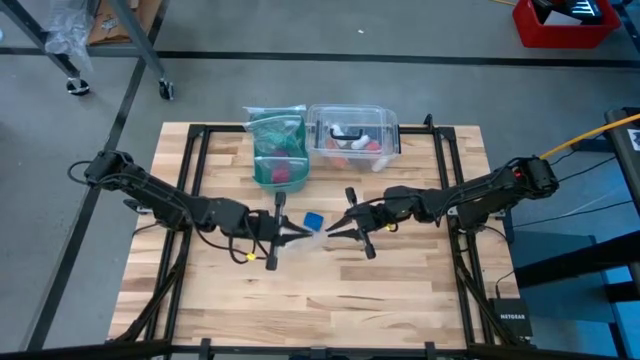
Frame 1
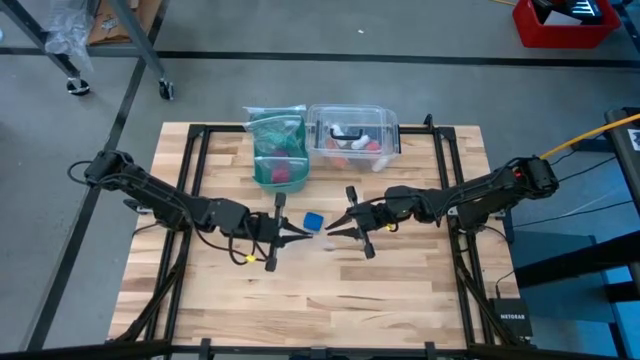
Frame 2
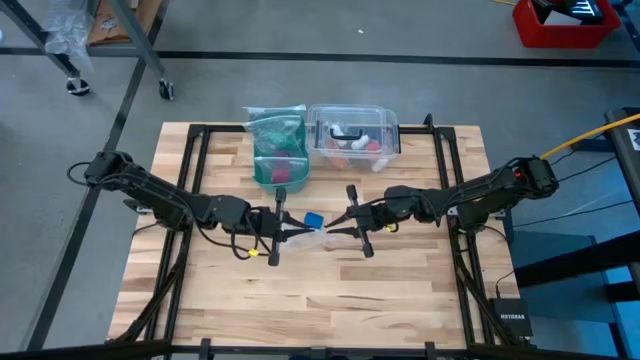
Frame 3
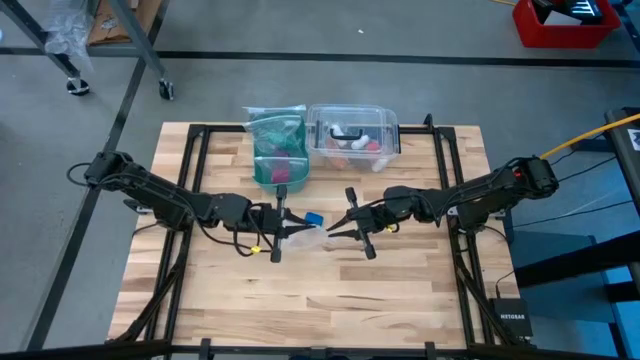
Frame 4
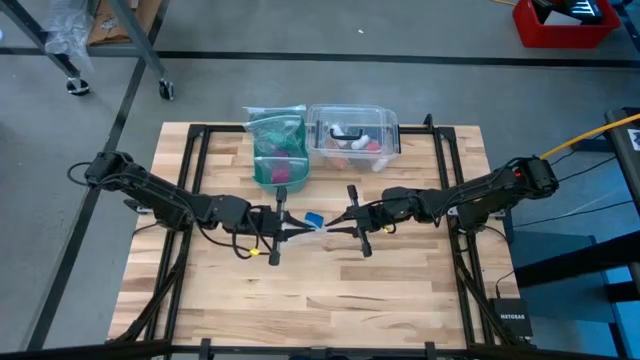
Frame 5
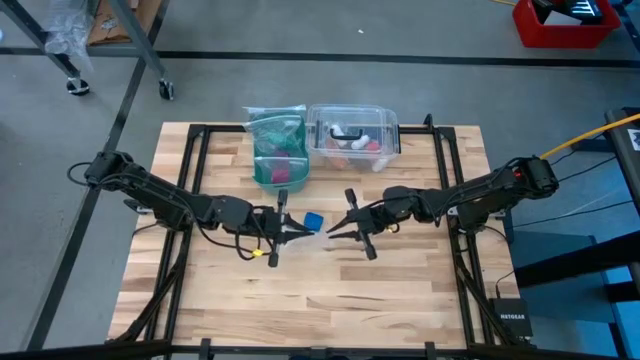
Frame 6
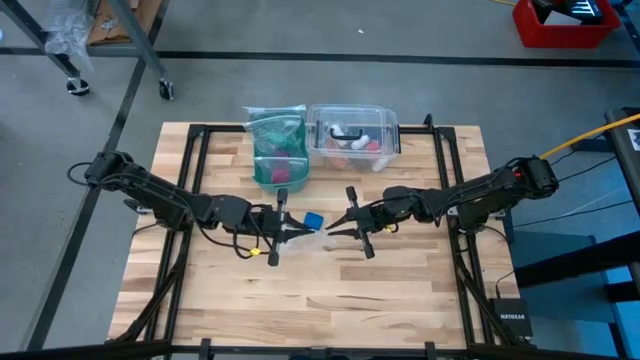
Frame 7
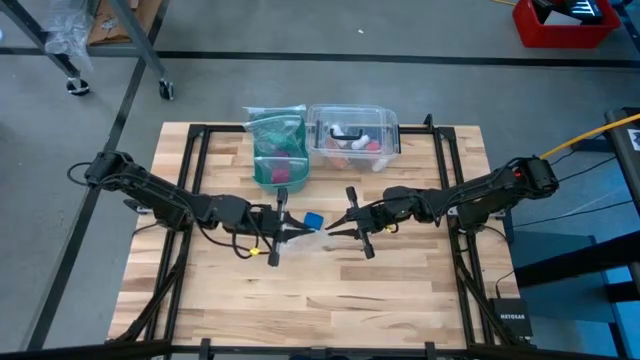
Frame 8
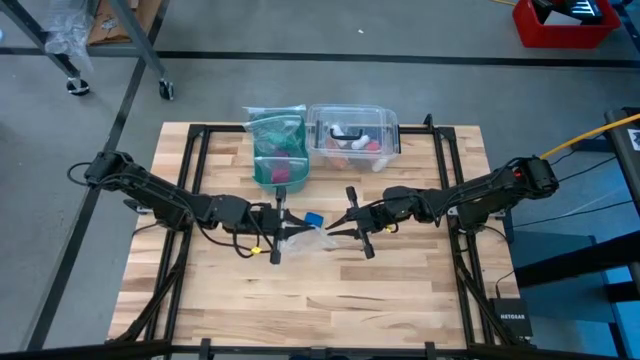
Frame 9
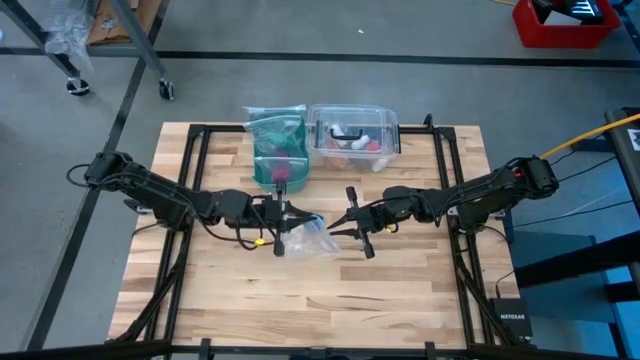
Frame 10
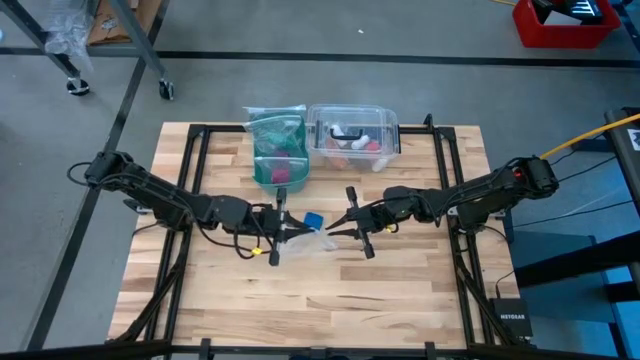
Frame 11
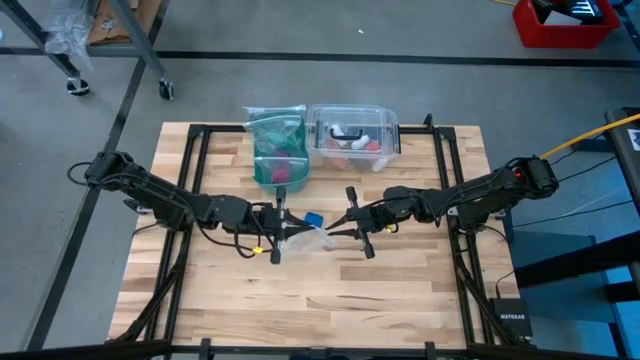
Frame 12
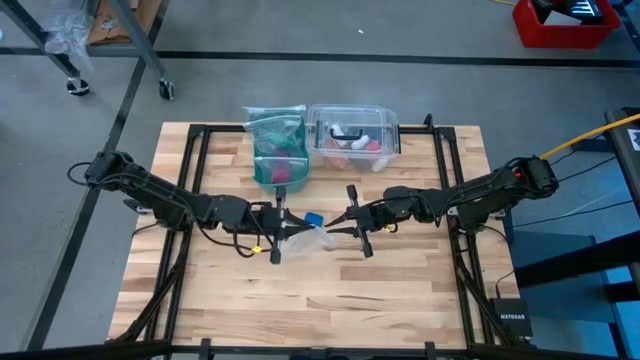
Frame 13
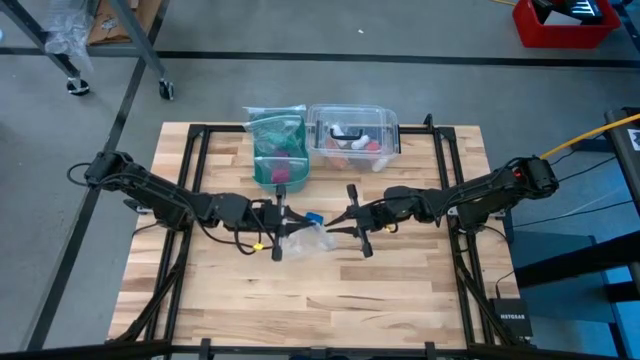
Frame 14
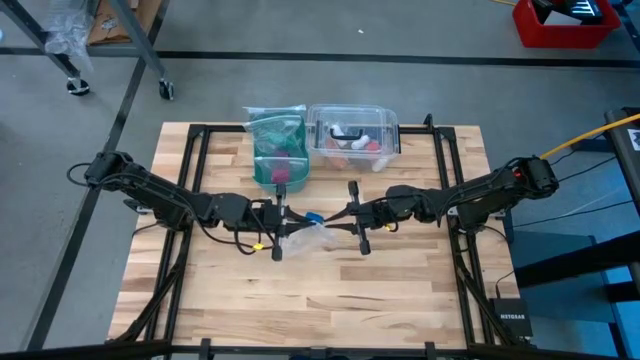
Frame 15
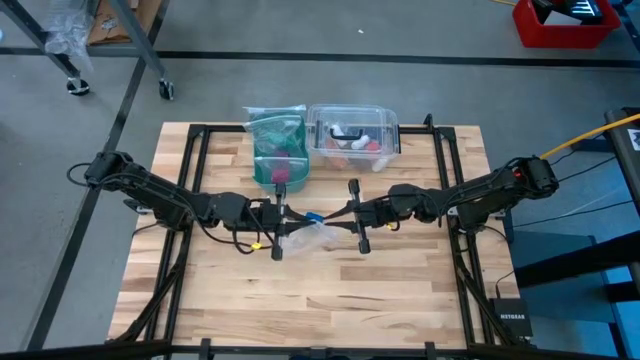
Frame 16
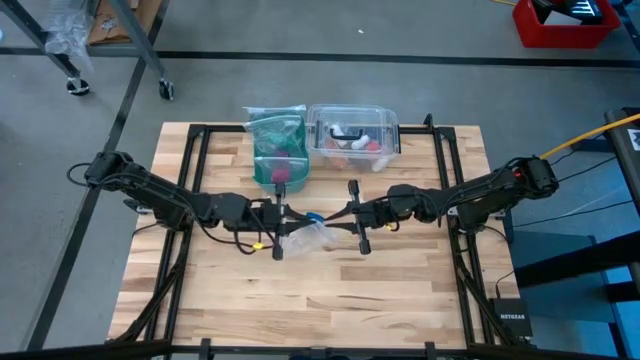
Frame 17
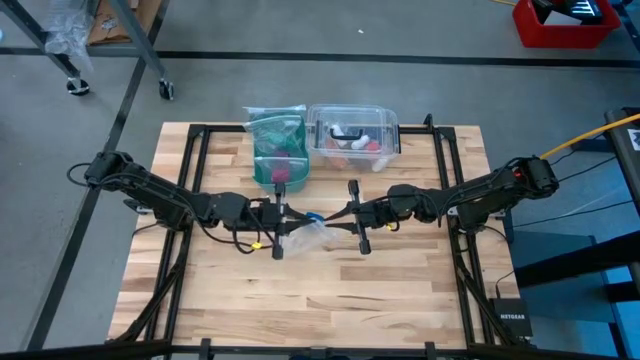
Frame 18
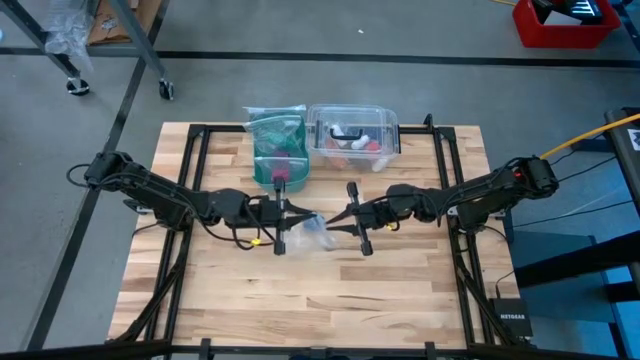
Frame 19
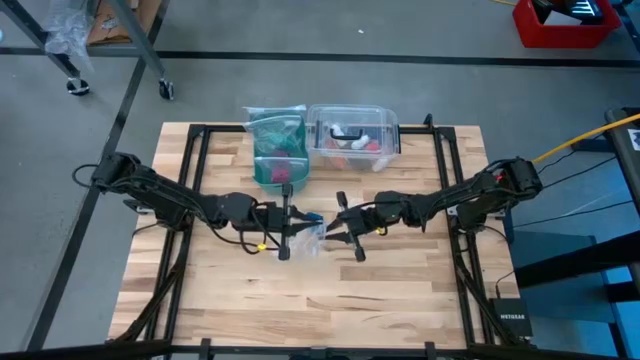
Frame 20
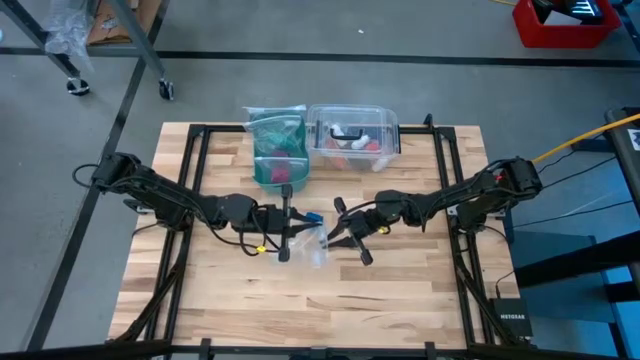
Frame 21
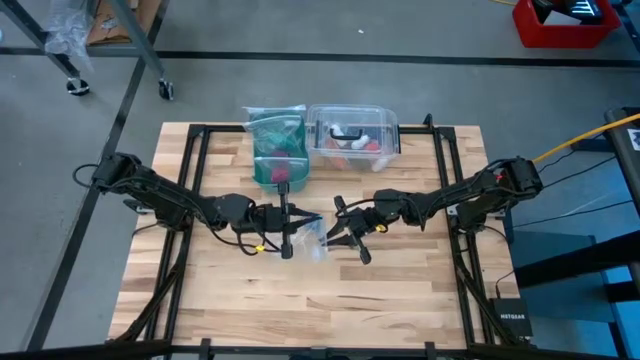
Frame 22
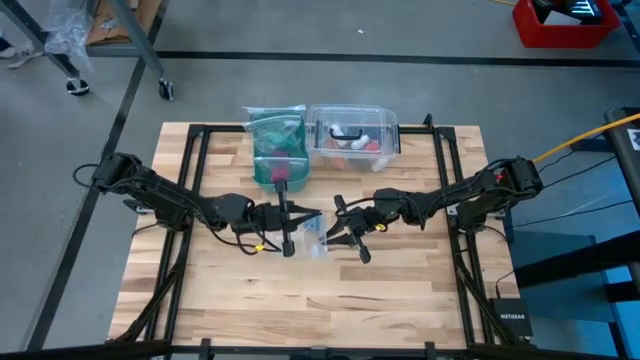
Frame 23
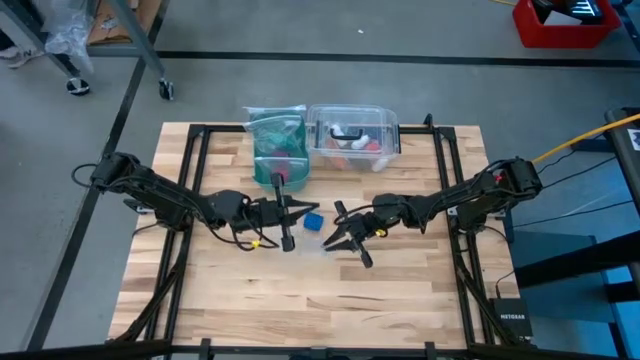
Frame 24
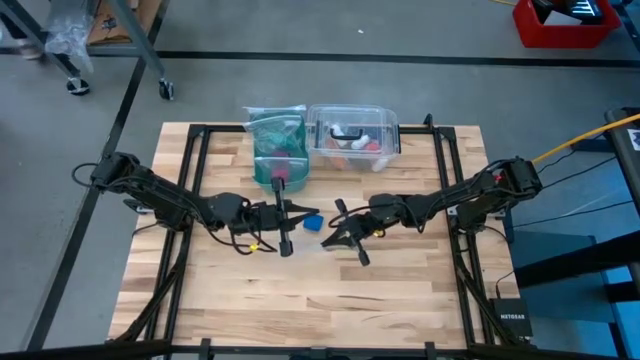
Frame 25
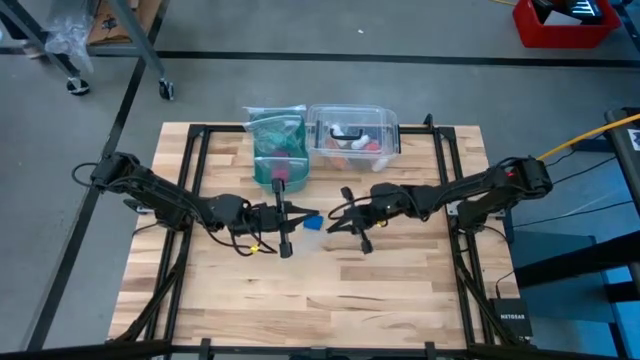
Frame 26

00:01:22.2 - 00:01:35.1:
Task: Roll bandage
Open the transparent zip bag

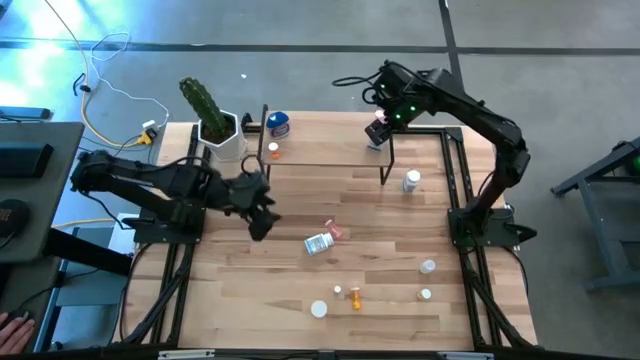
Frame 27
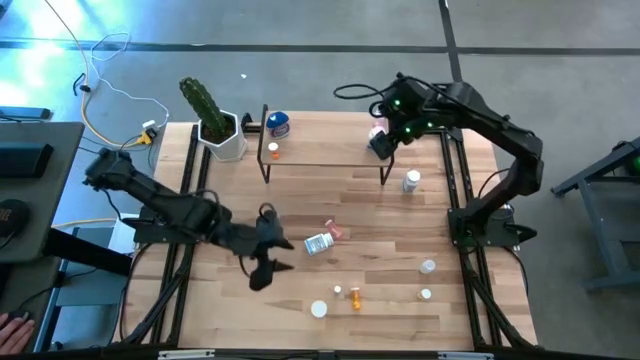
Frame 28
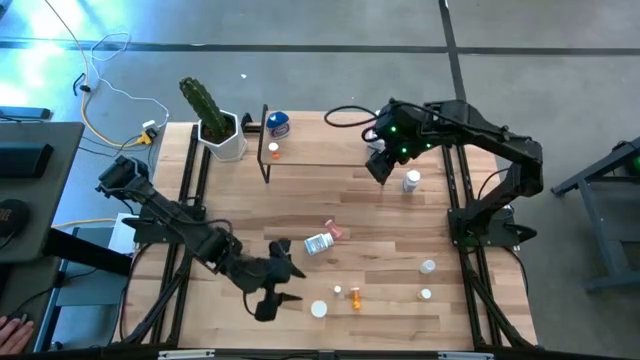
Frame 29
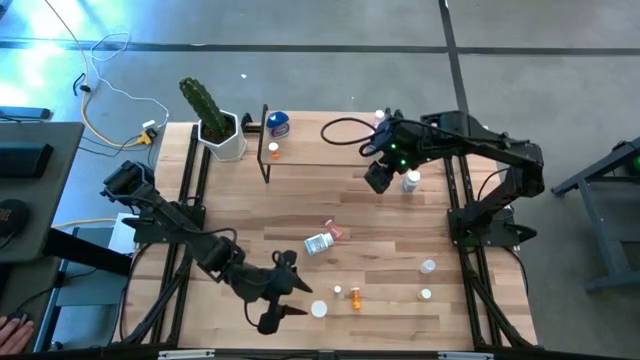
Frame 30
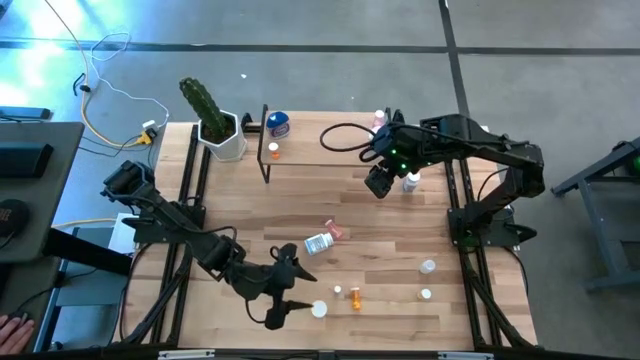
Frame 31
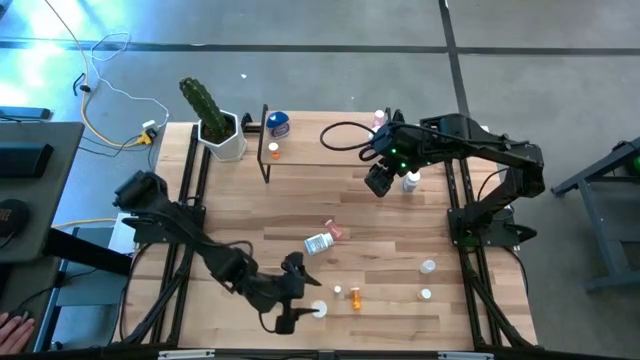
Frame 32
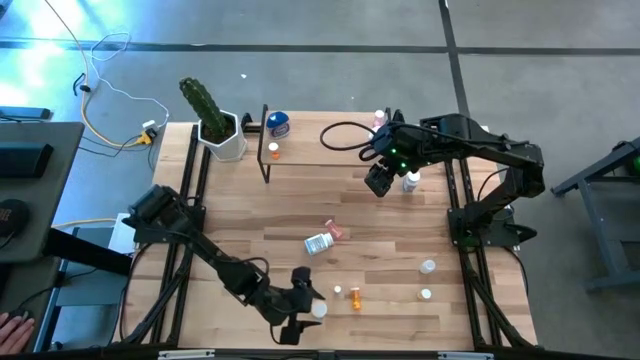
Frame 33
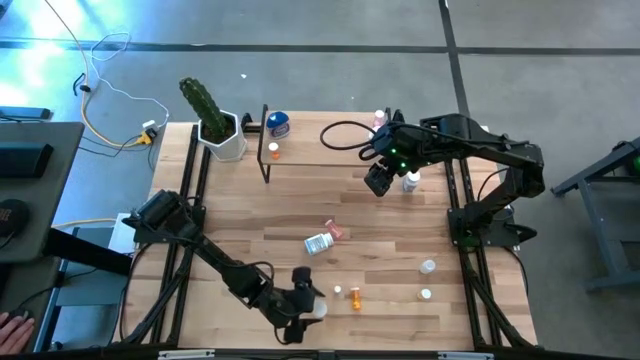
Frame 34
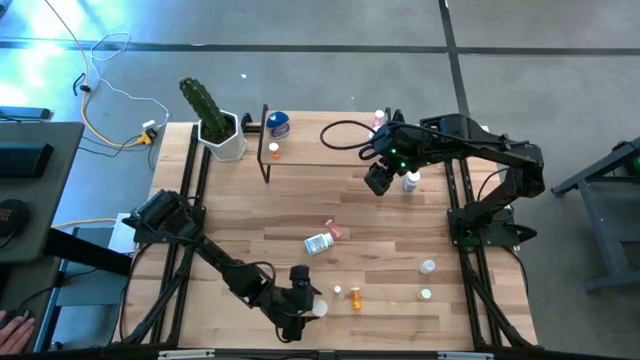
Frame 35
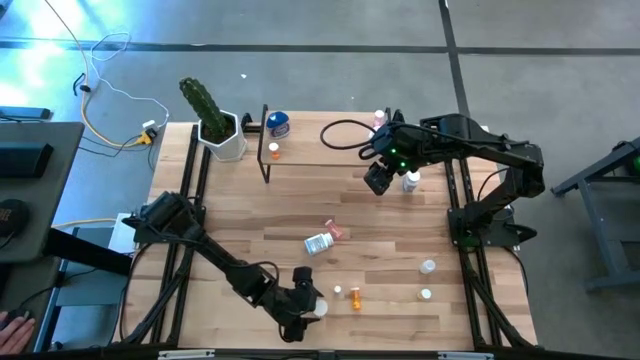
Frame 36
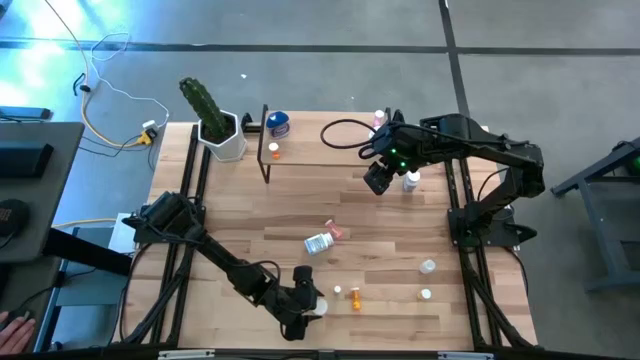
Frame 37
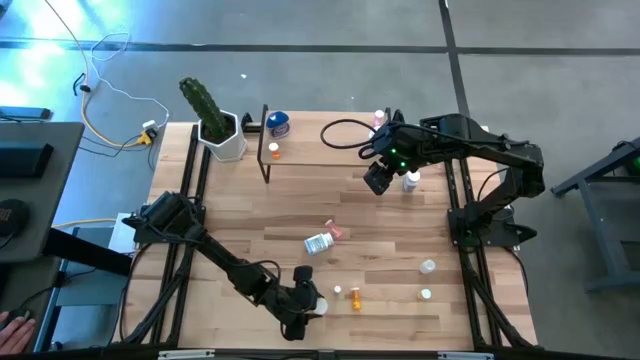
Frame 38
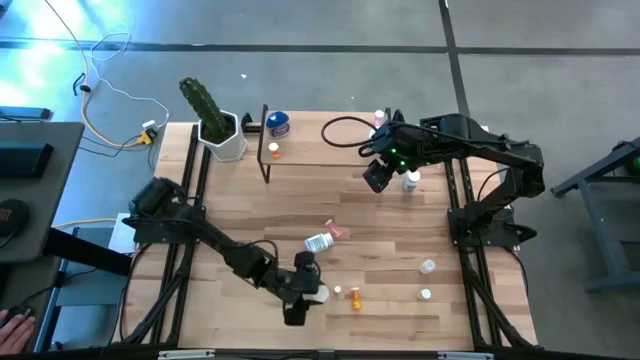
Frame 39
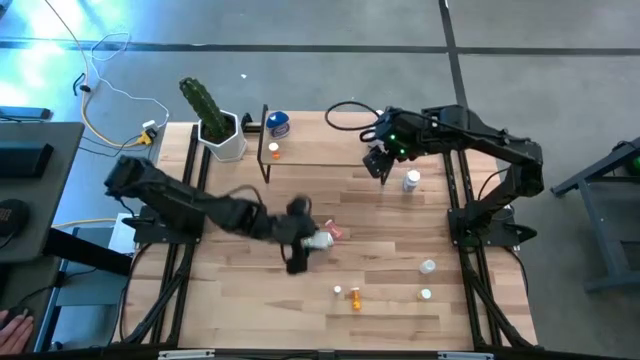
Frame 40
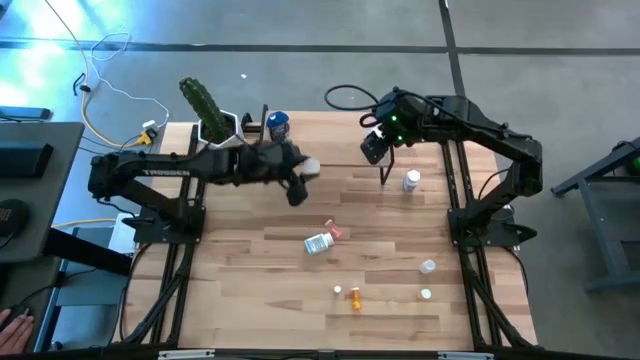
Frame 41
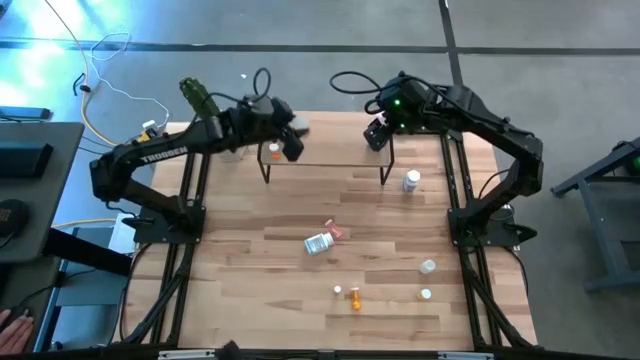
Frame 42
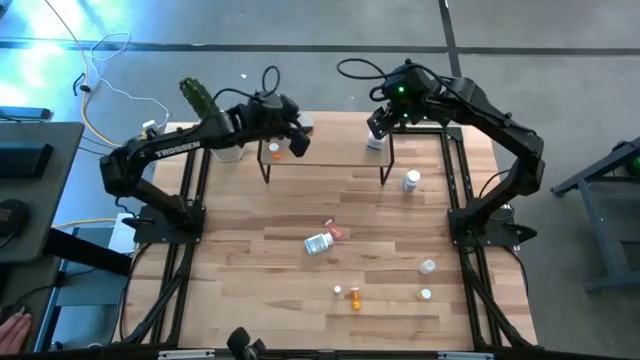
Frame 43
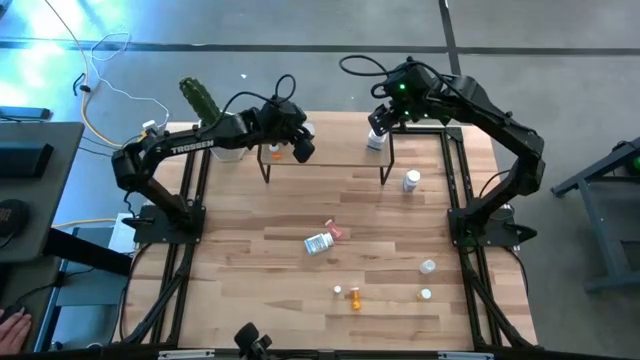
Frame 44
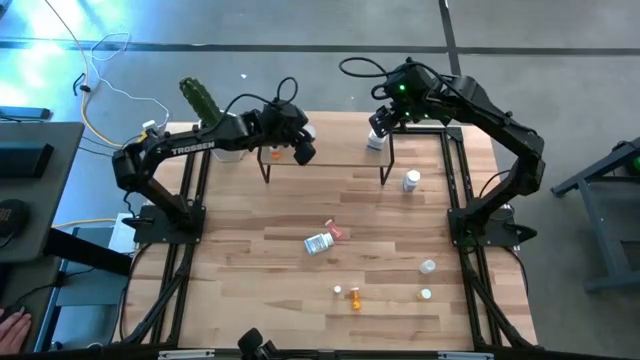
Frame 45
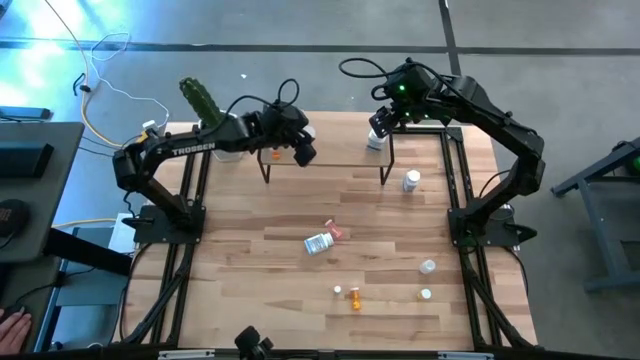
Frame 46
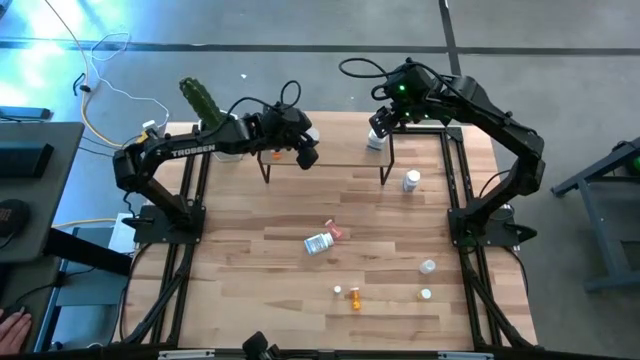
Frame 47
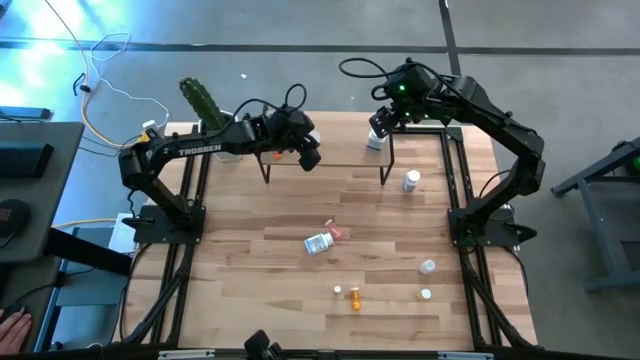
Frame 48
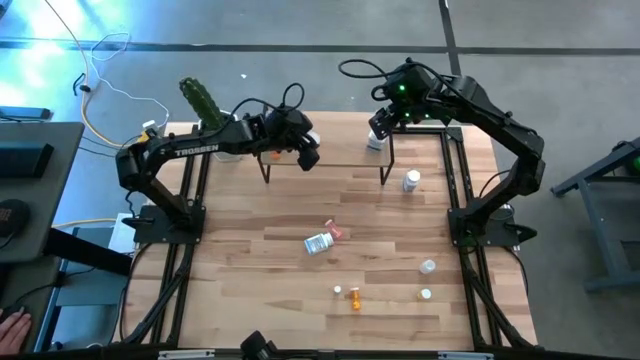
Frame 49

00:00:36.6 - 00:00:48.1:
Task: Pick and place medicine bottles onto shelf by color
Put the big orange pill bottle on the shelf
